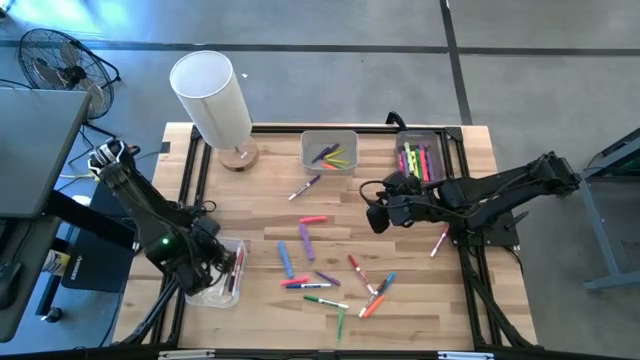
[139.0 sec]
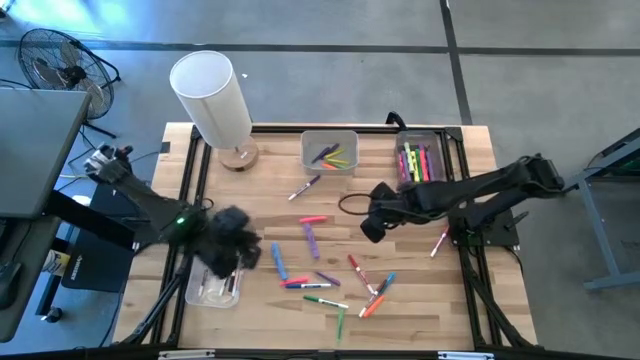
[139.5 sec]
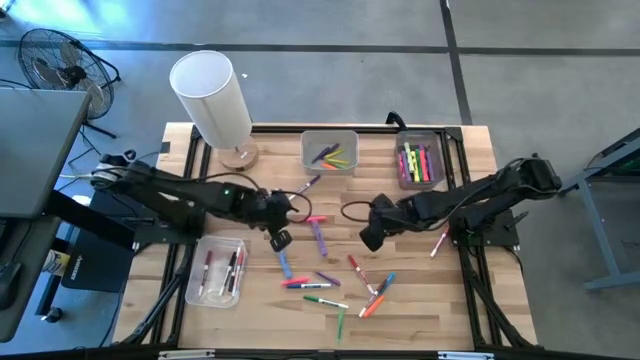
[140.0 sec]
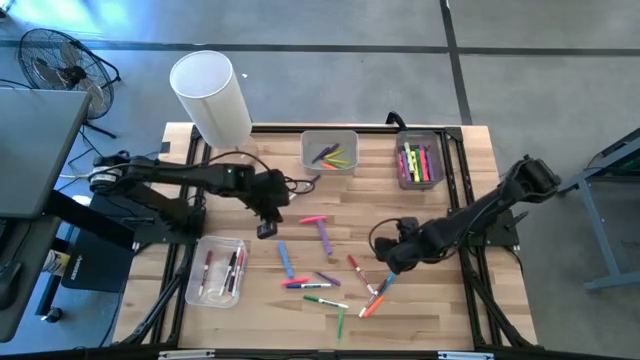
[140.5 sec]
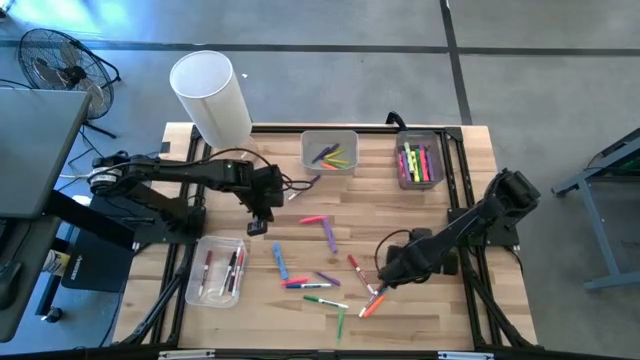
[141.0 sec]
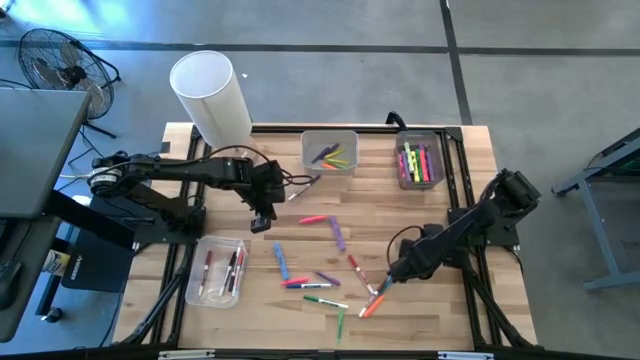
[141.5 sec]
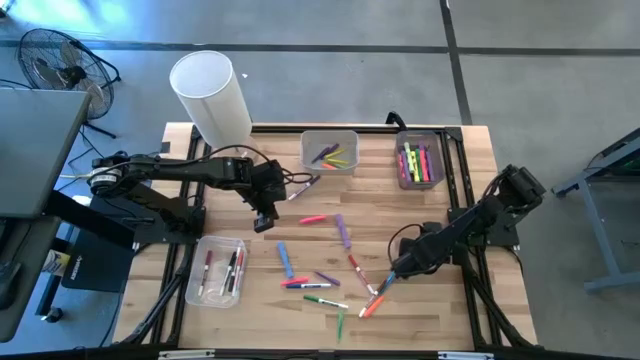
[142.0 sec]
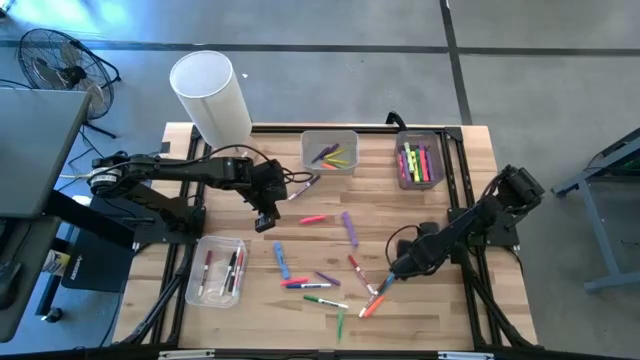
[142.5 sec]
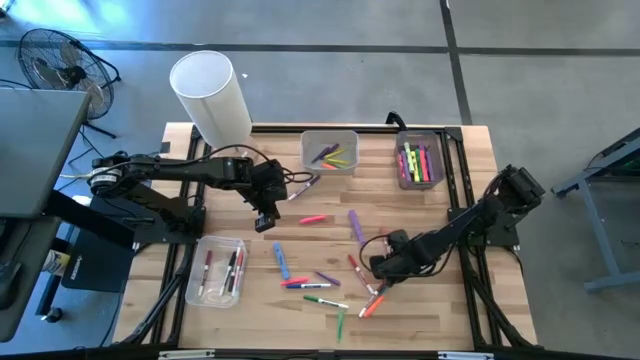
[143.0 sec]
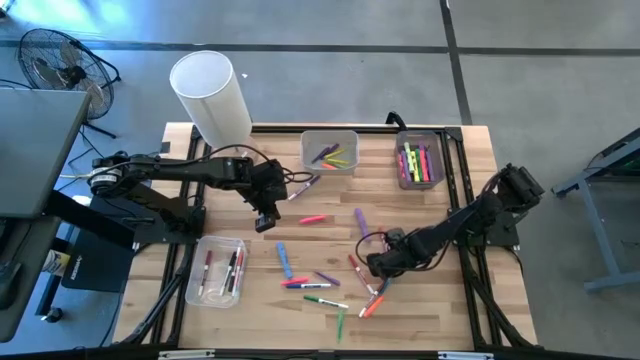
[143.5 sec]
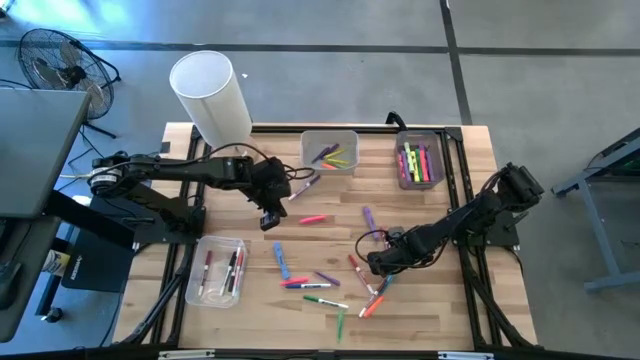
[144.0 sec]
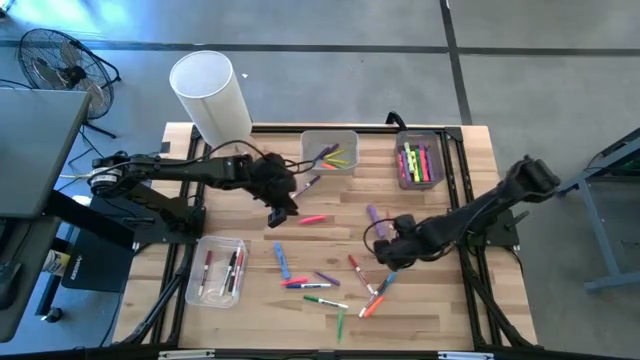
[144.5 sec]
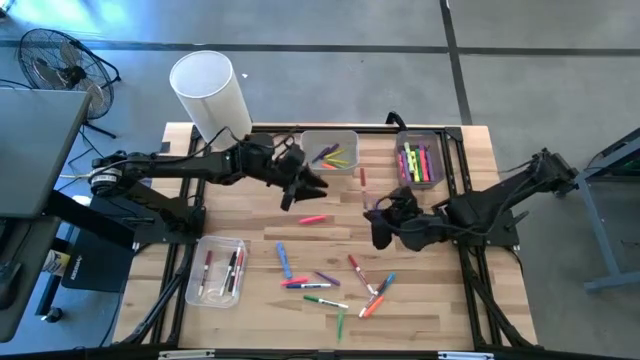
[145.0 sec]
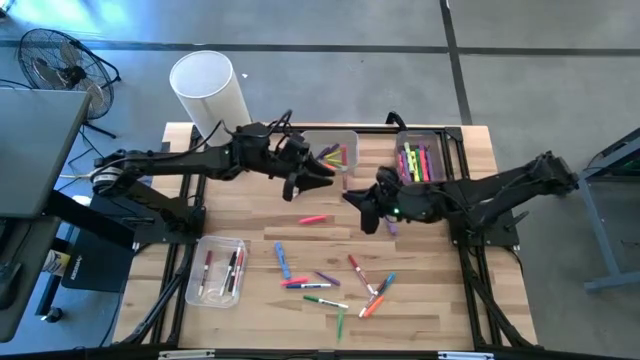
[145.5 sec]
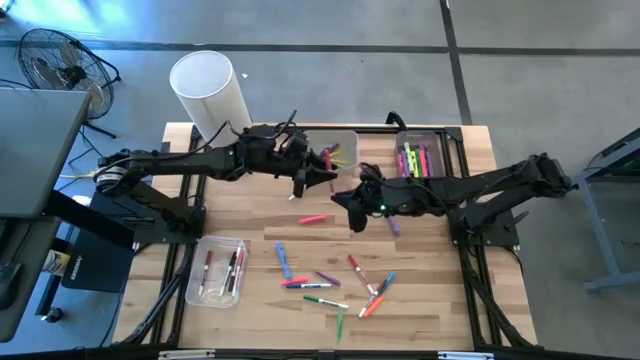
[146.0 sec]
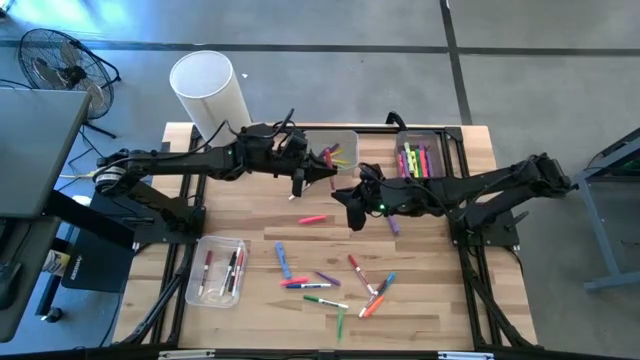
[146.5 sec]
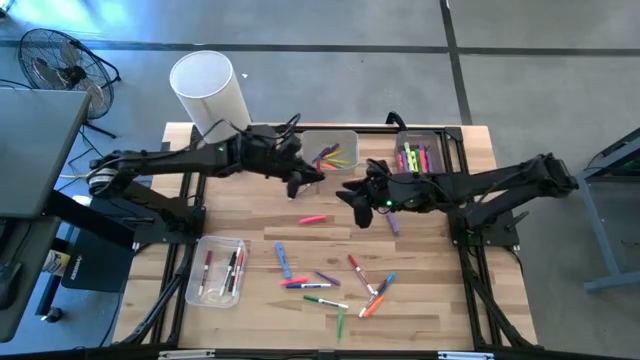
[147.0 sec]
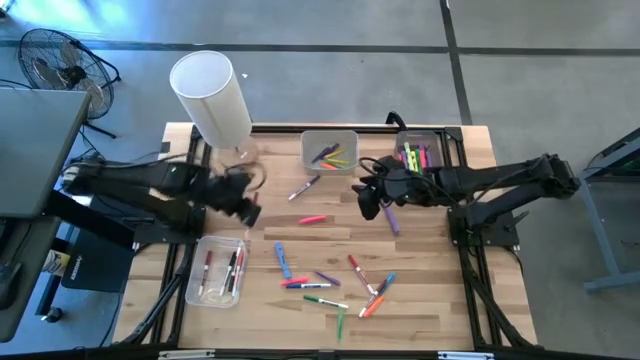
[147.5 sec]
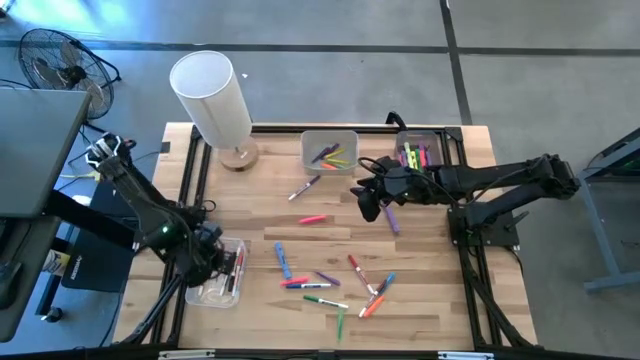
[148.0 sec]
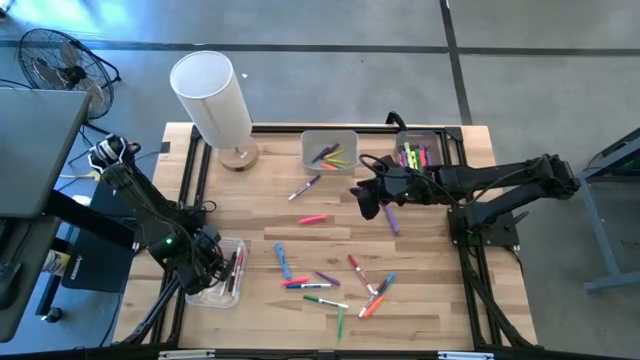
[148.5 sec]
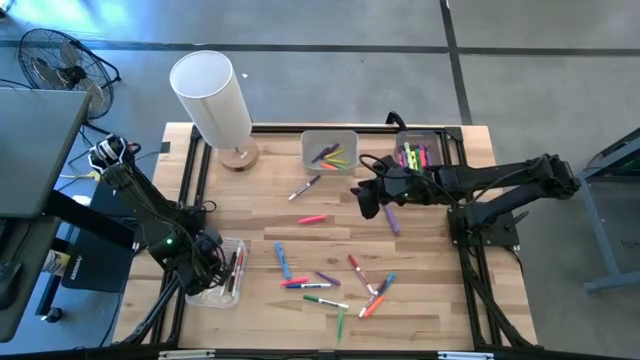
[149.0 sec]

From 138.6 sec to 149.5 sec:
Task: Pick & Place Markers
Put the pink marker pen into the transparent bin

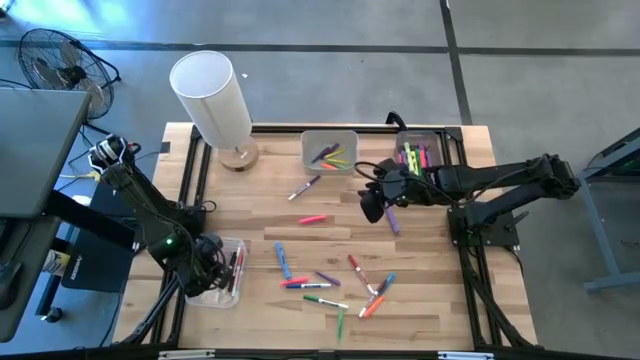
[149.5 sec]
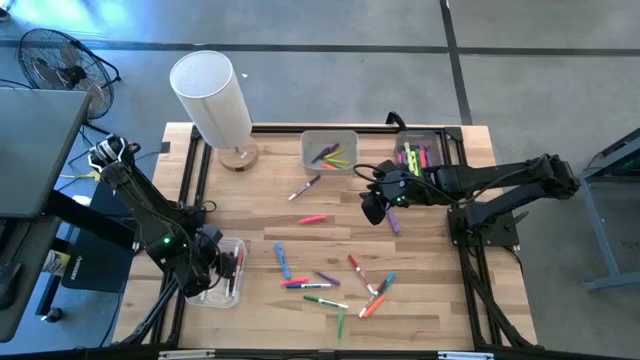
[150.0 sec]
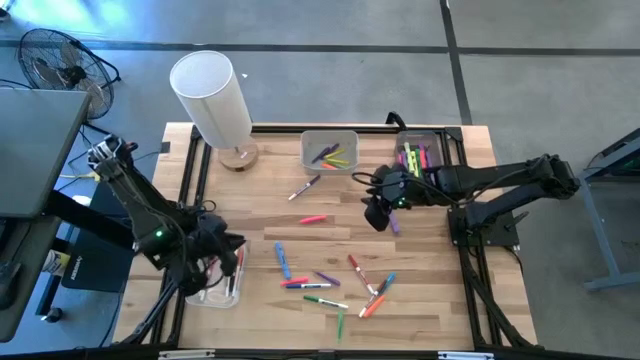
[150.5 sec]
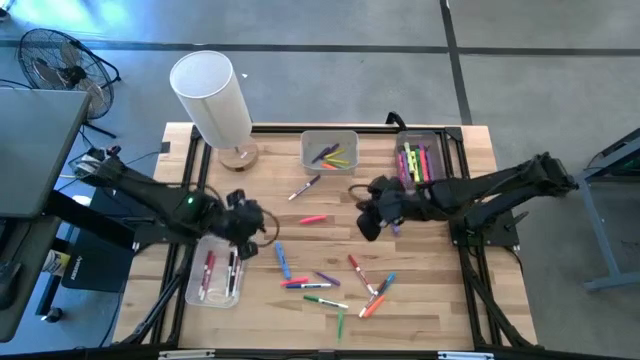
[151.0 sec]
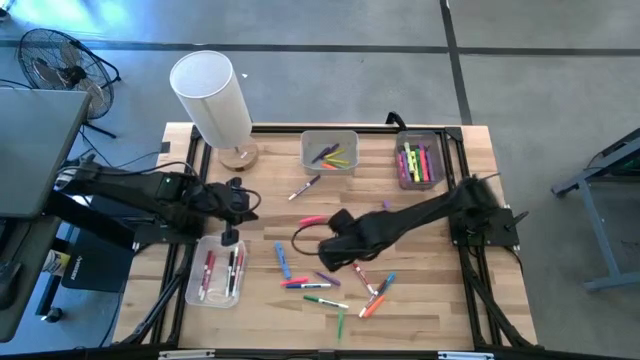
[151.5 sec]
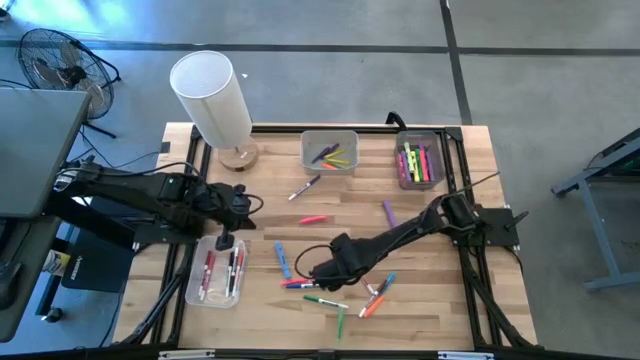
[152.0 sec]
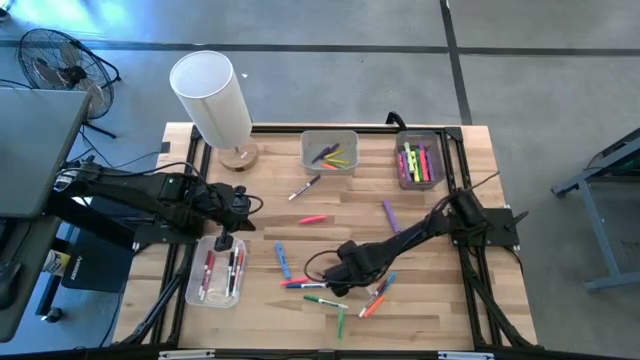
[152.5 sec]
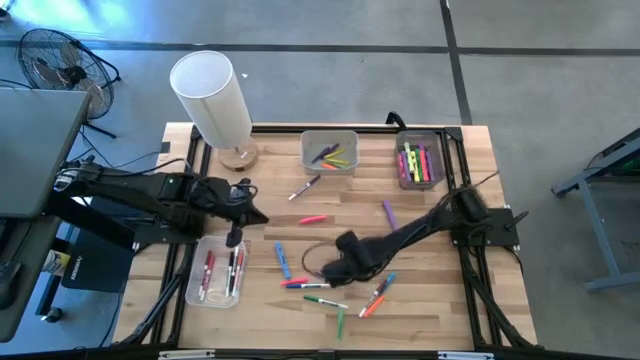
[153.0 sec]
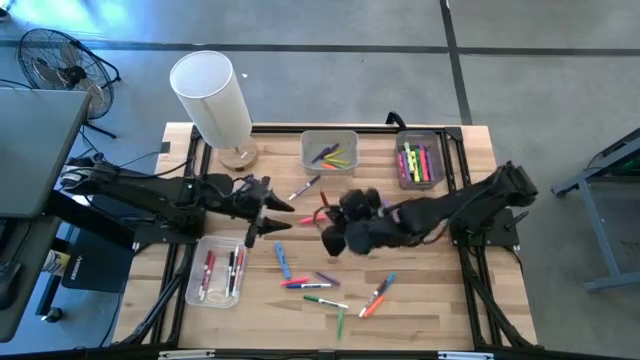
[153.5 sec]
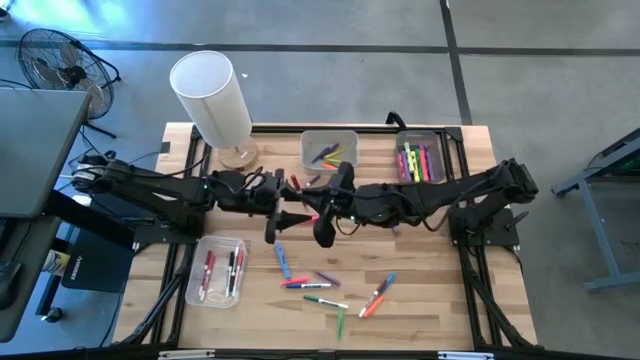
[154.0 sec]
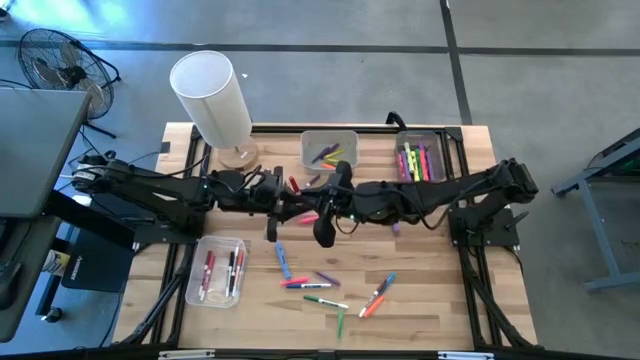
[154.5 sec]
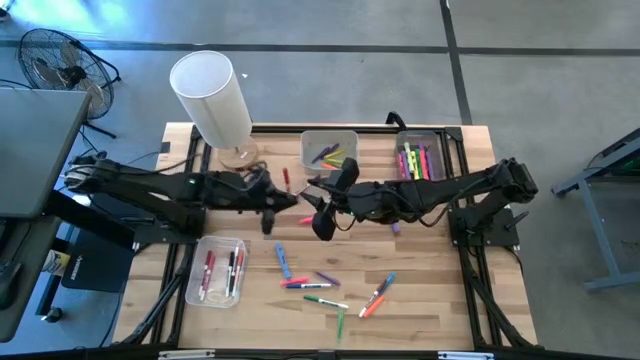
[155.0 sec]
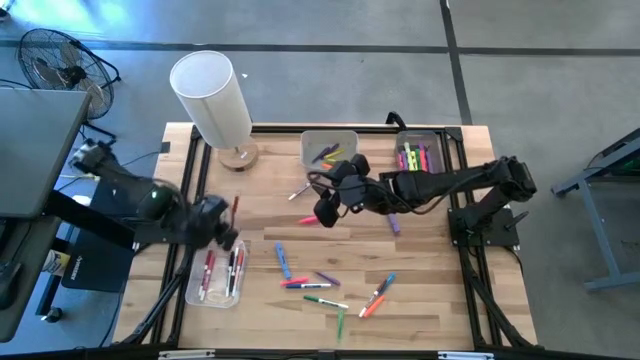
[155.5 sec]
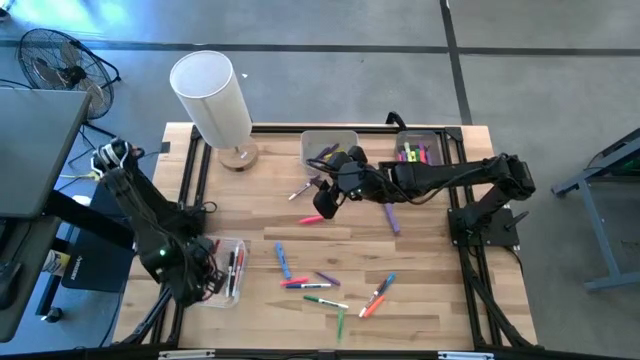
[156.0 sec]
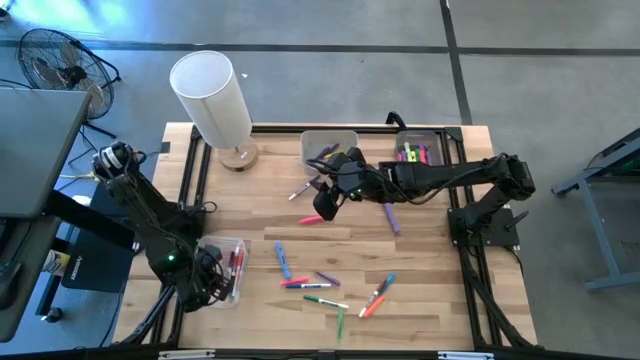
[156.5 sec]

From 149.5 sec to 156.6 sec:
Put the red marker pen into the transparent bin

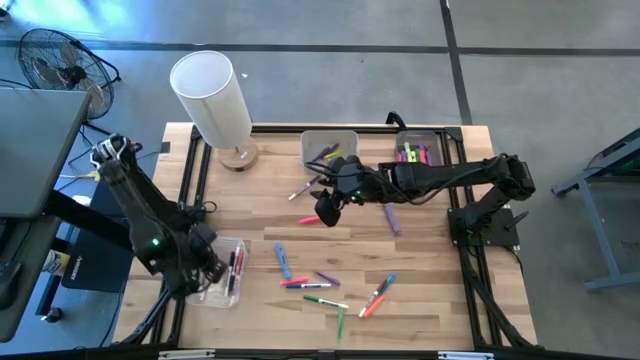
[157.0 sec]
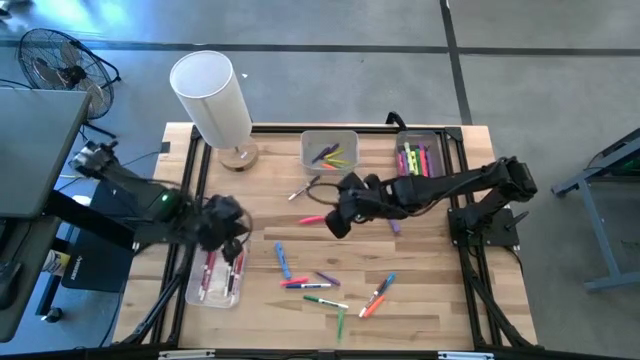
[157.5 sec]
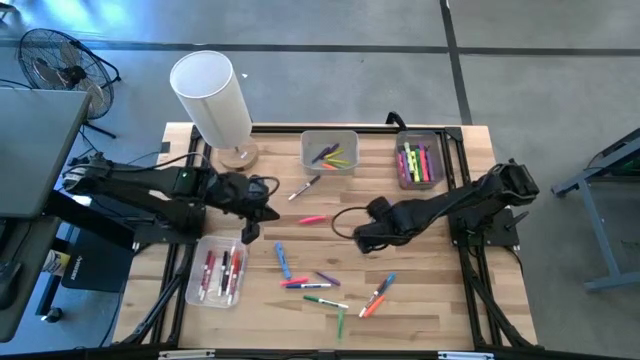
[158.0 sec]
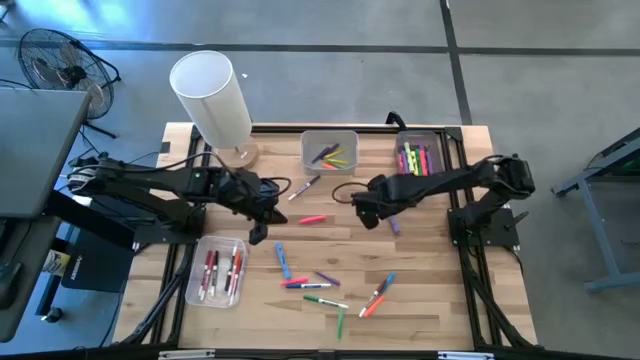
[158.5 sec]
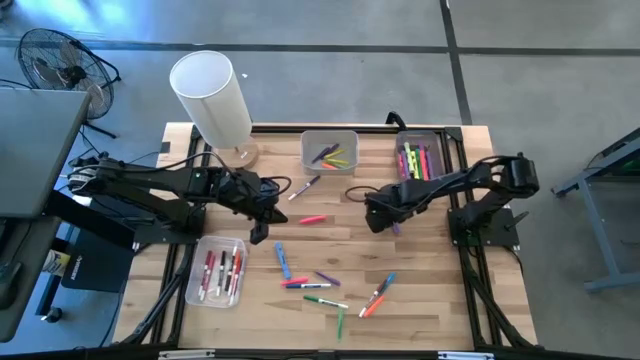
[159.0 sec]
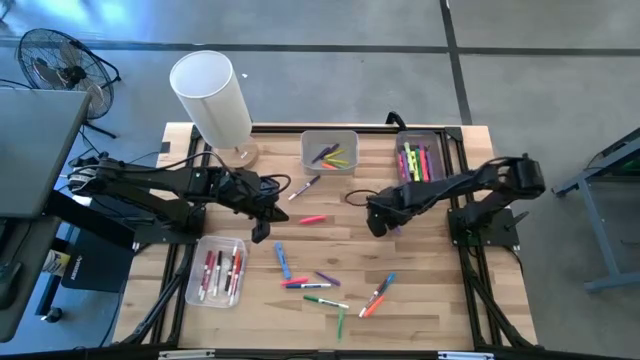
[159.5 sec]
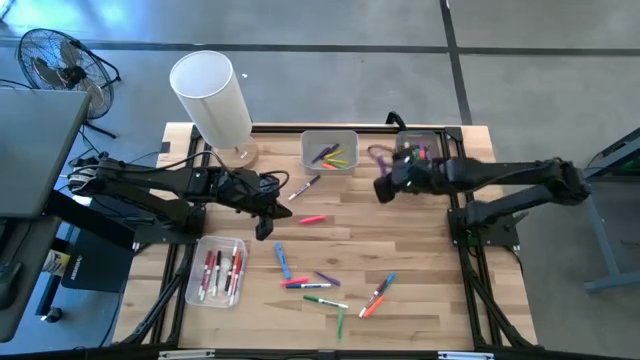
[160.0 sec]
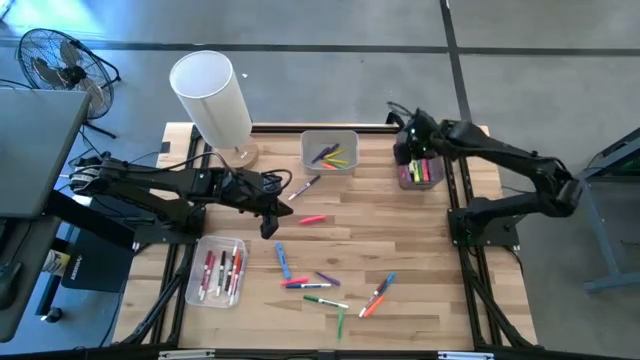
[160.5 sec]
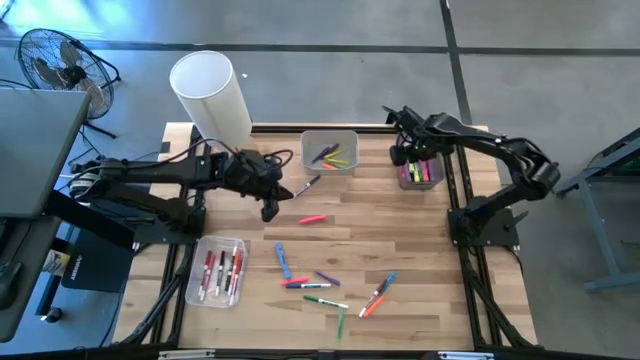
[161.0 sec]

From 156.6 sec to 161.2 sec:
Put the blue highlighter pen into the black bin
